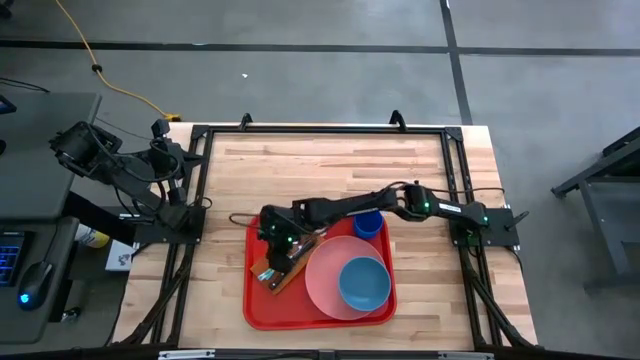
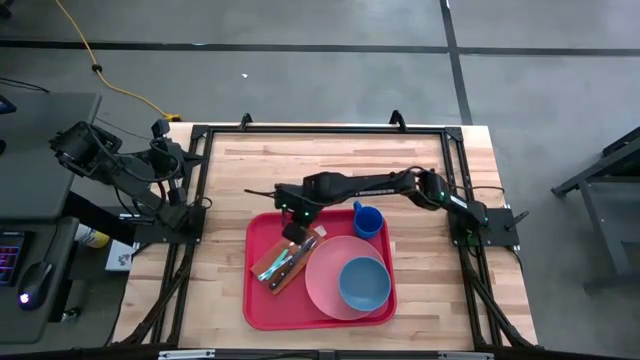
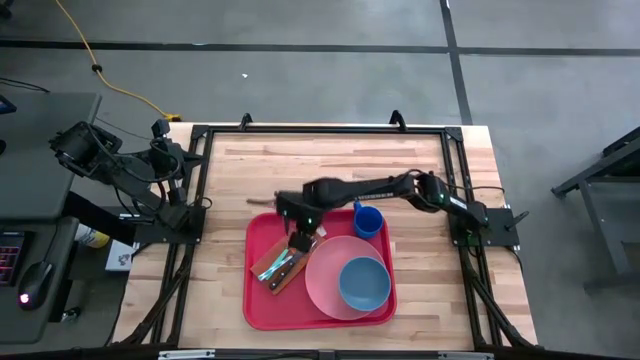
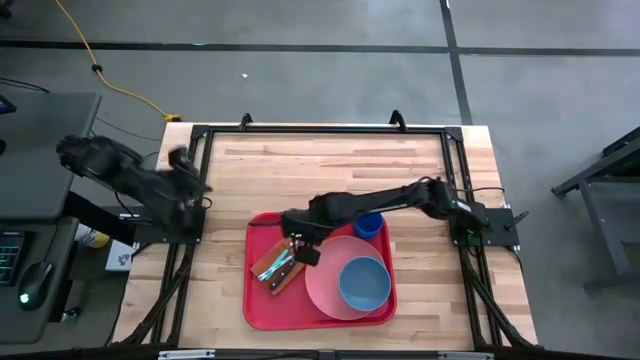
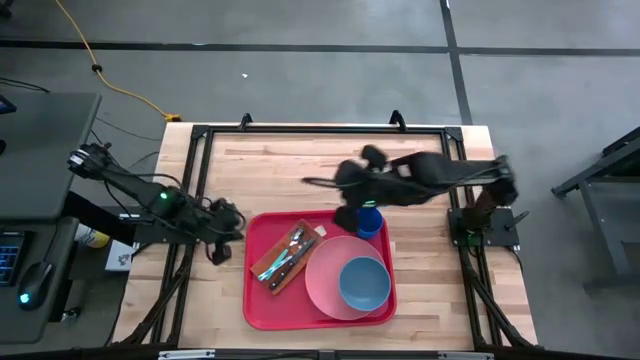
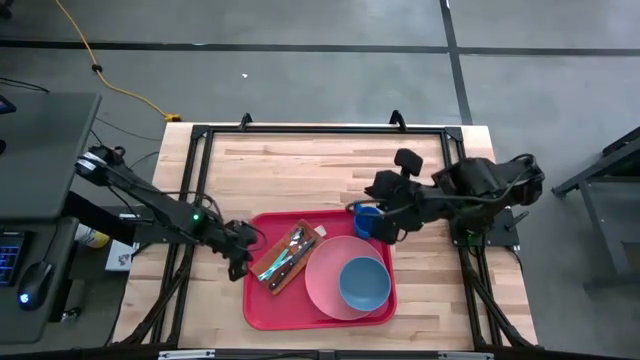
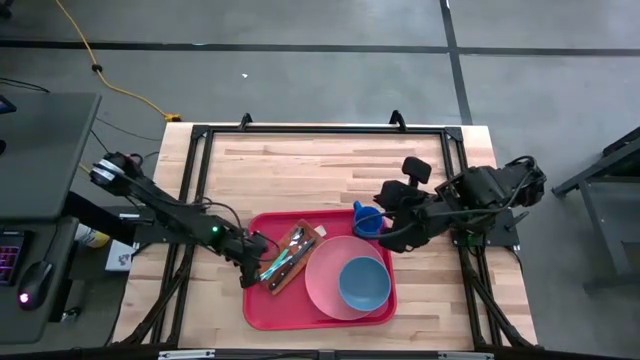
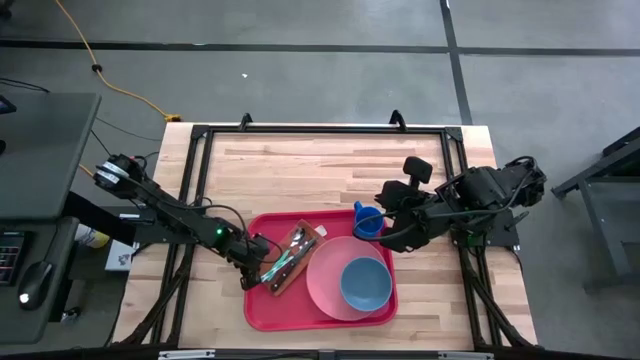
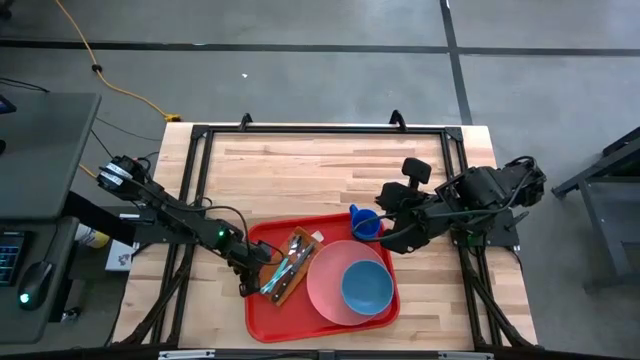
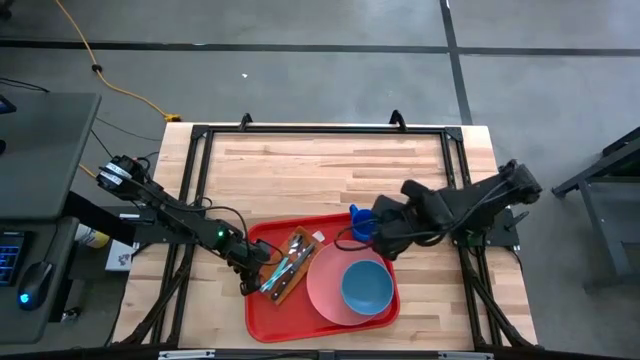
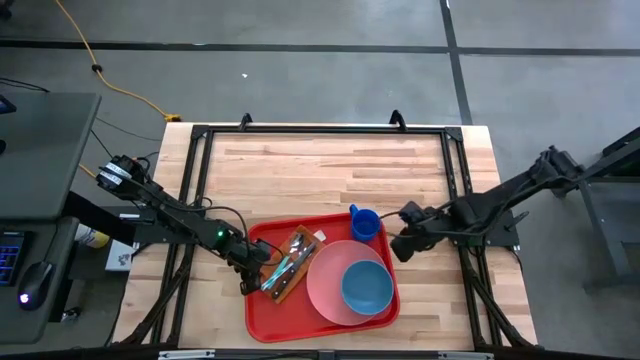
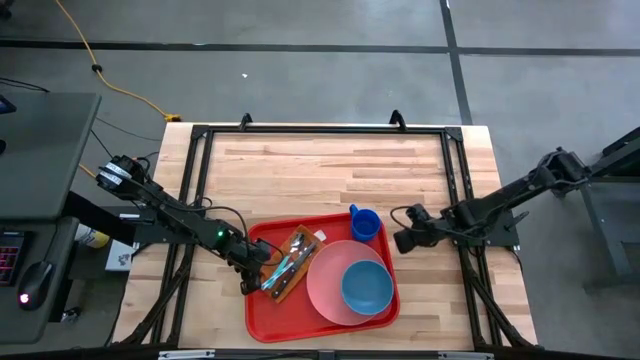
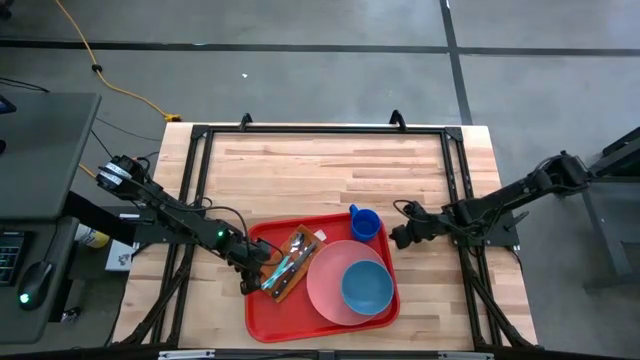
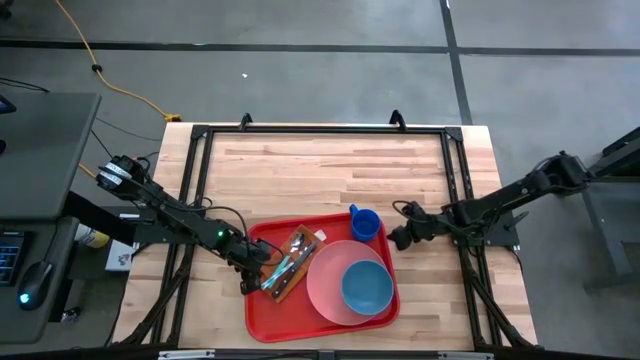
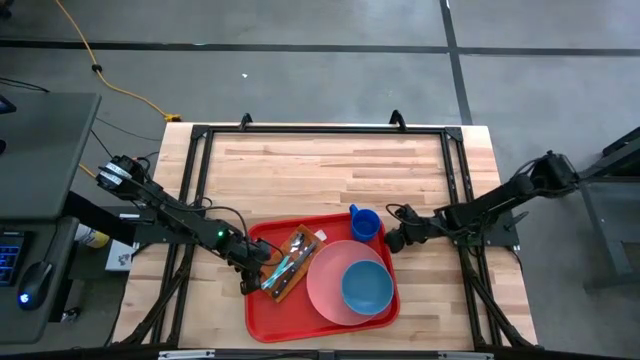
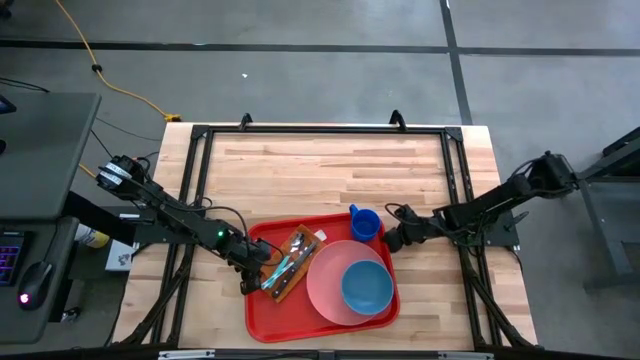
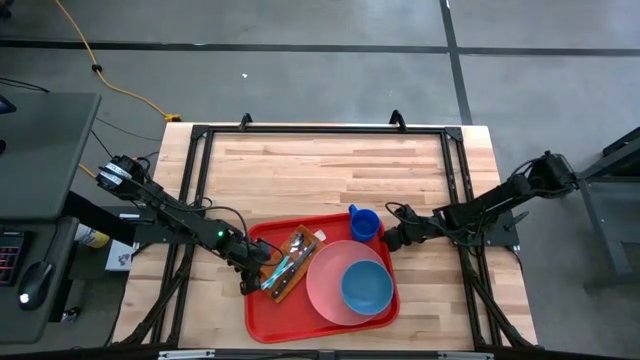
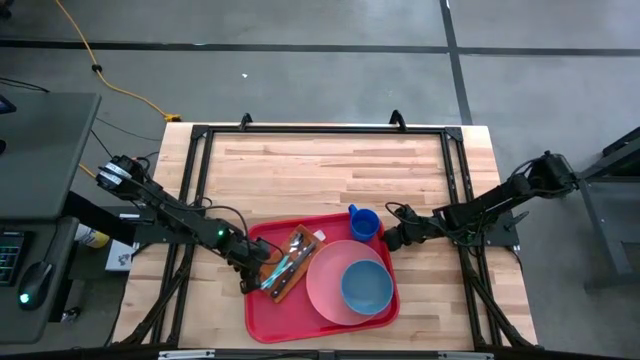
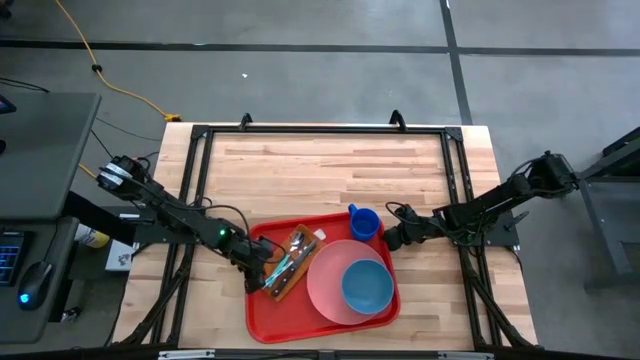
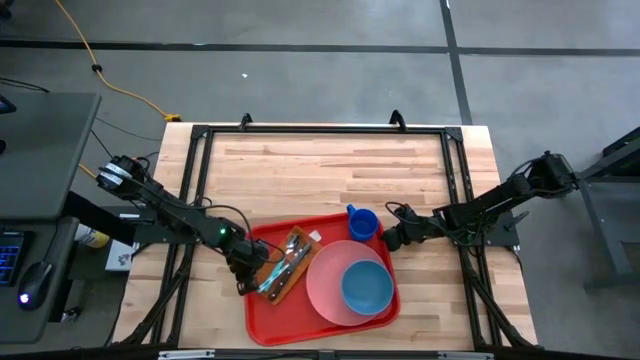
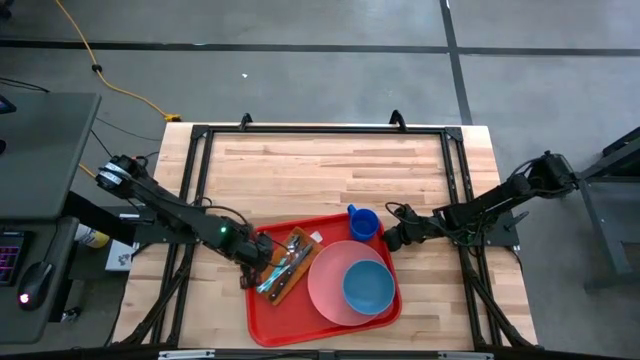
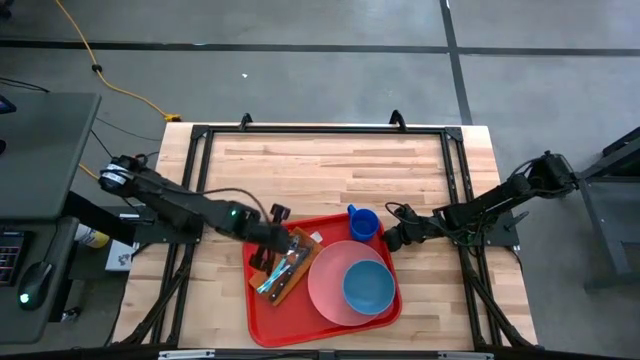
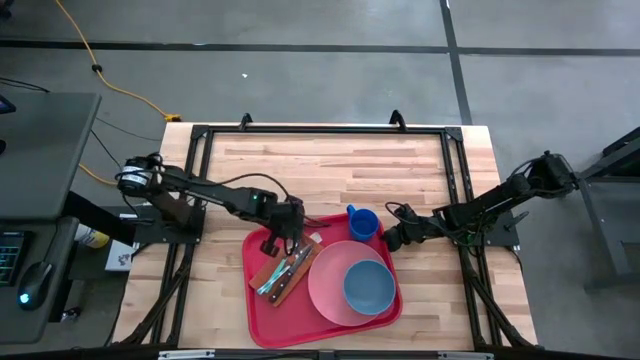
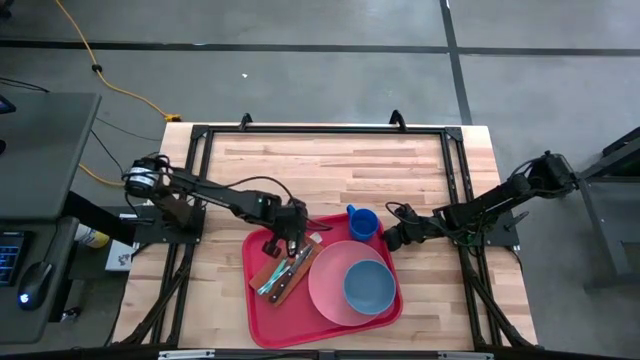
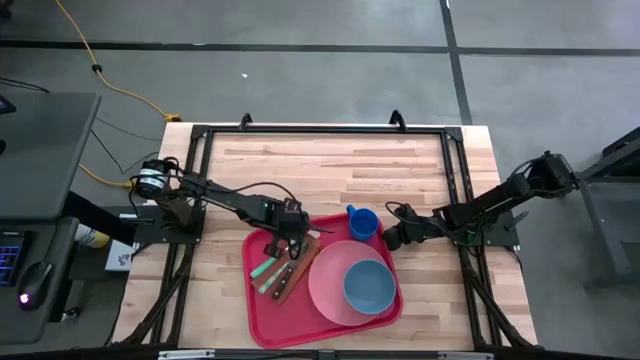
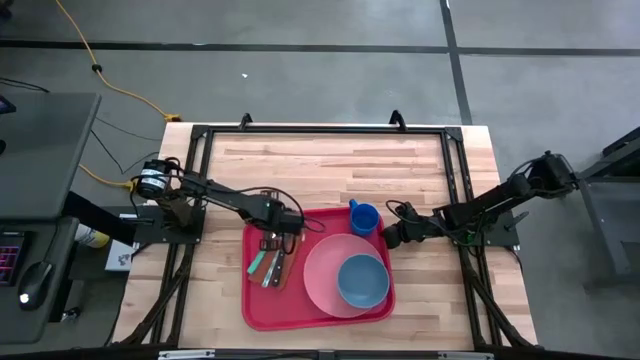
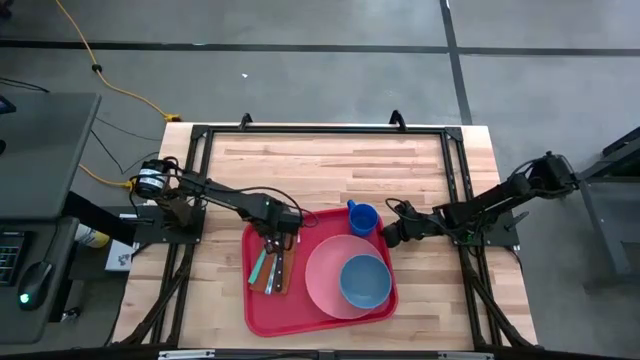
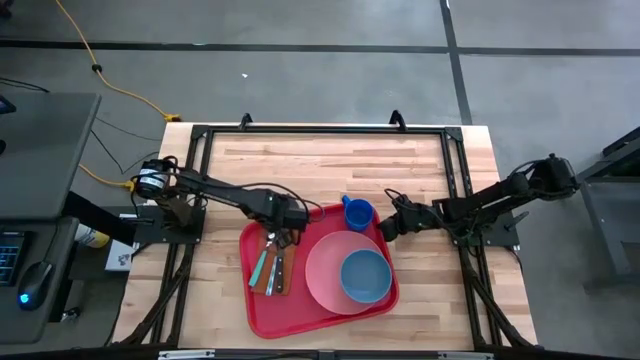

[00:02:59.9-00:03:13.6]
Task: Set up tray
Adjust the orange napkin on the red serving tray

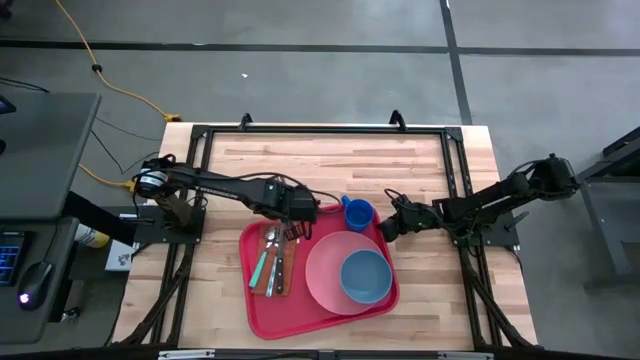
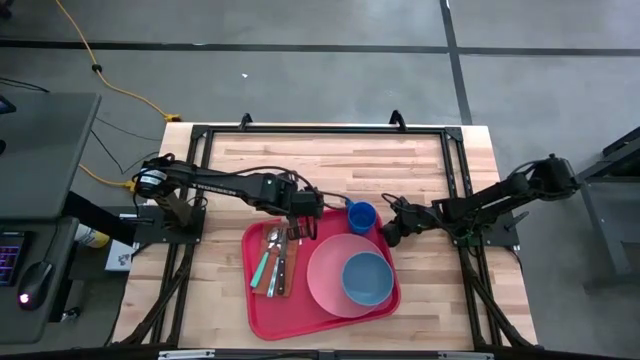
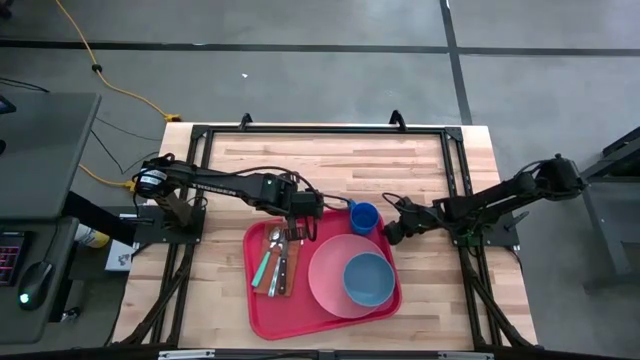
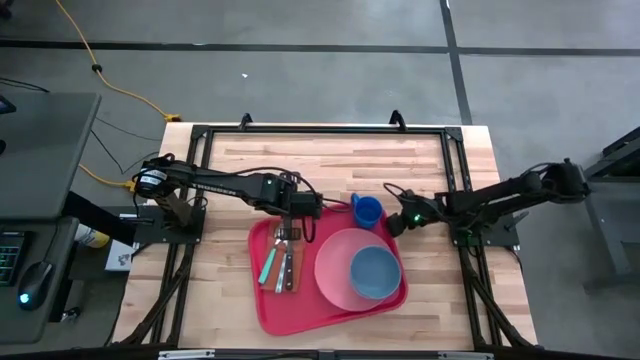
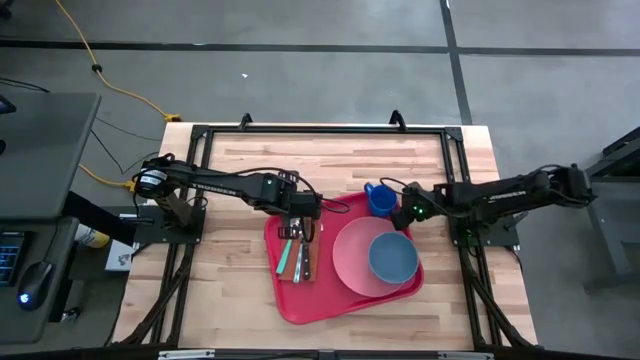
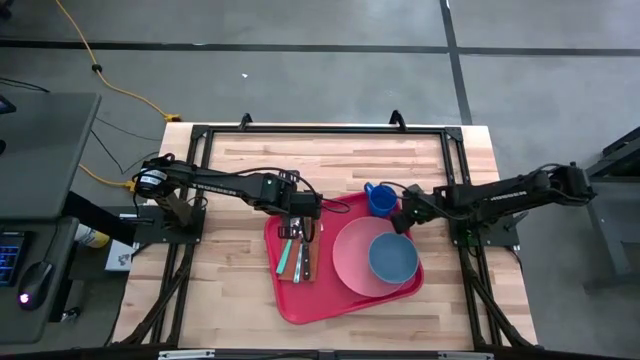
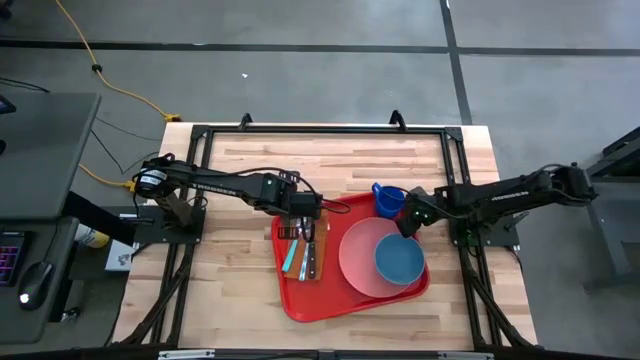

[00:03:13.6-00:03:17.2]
Adjust the red serving tray on the table

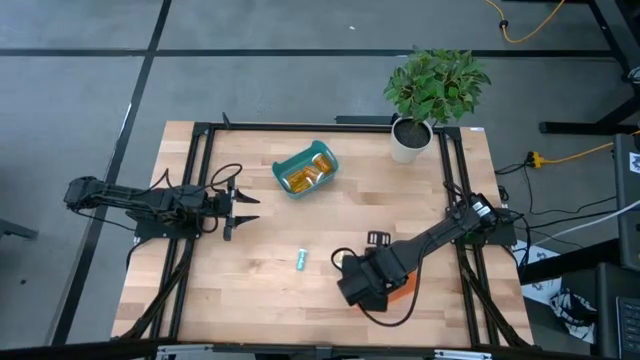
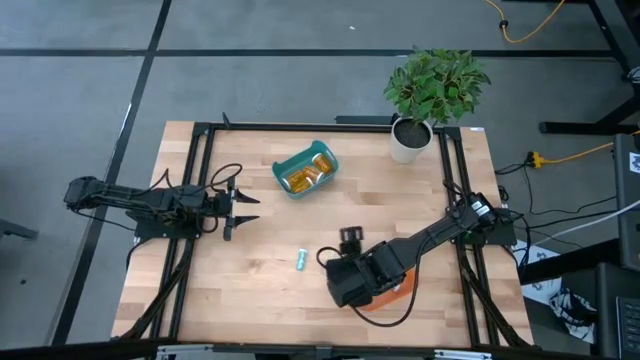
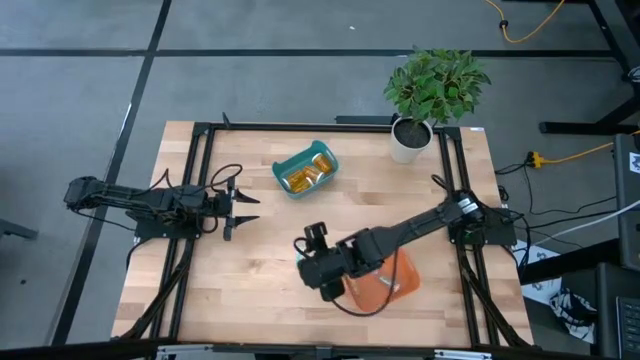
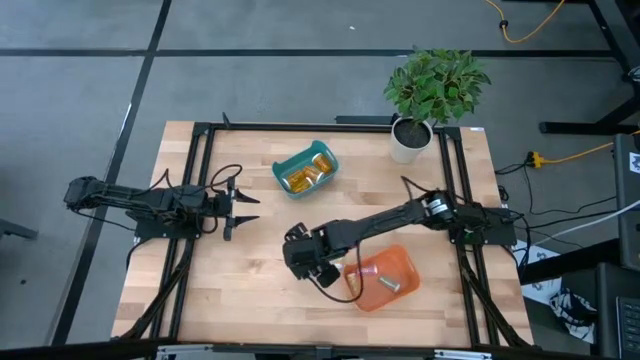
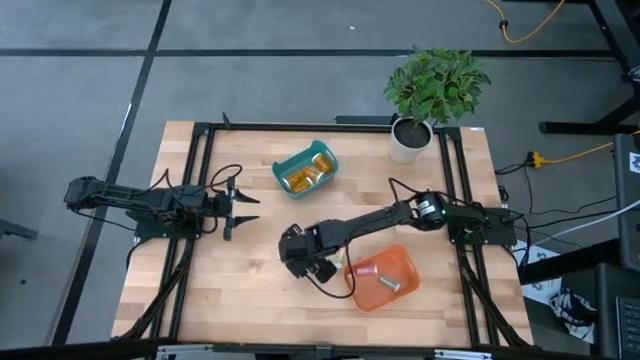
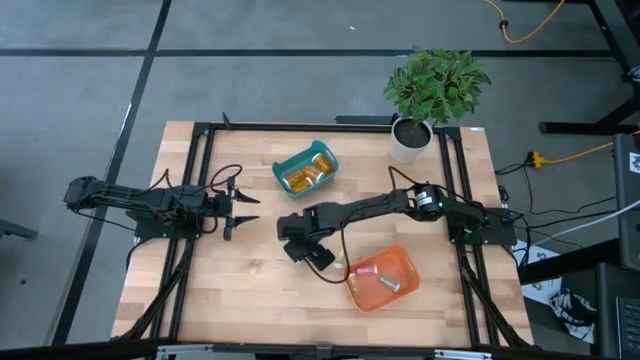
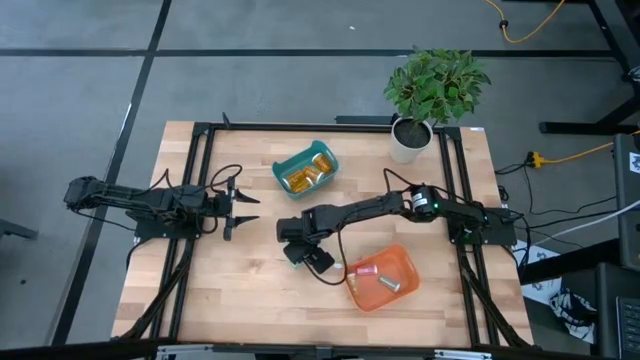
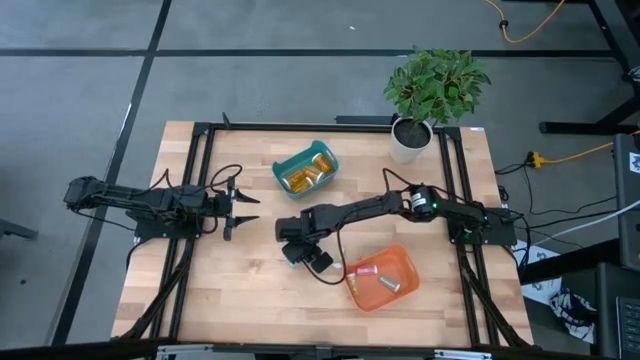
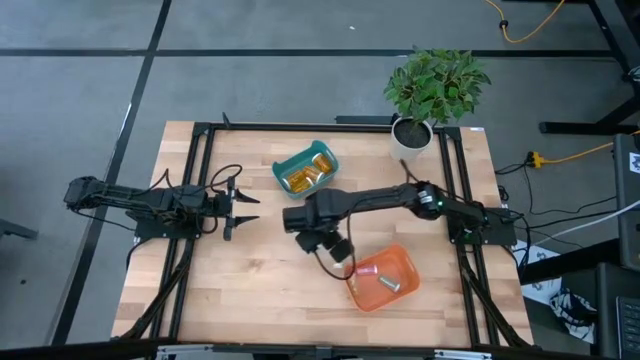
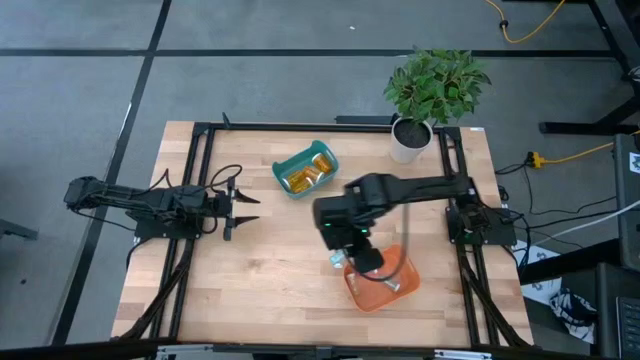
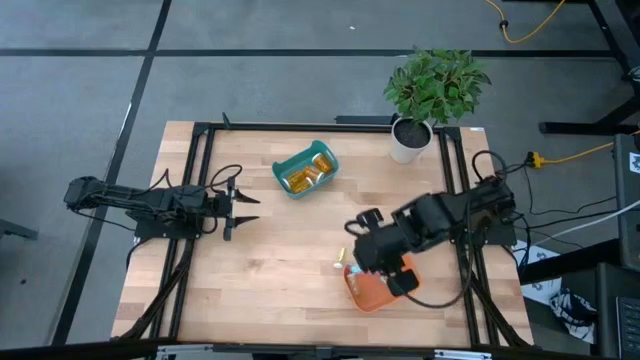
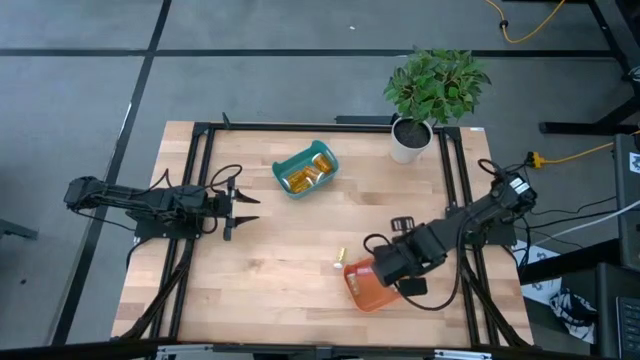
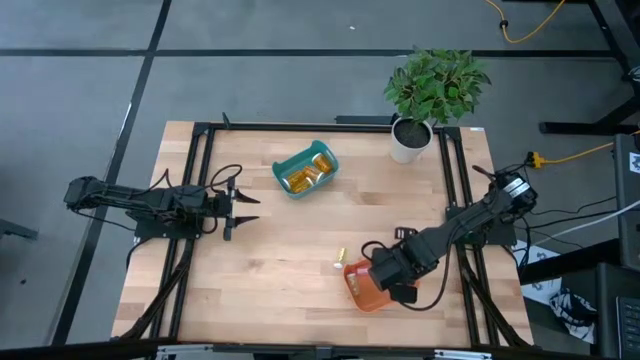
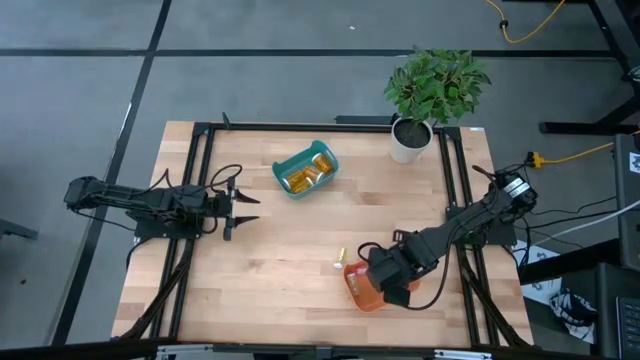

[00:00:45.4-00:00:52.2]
Task: Pick and place medicine bottles into bin by pill shape (circle, oval)
Put the small light blue pill bottle into the orange bin
